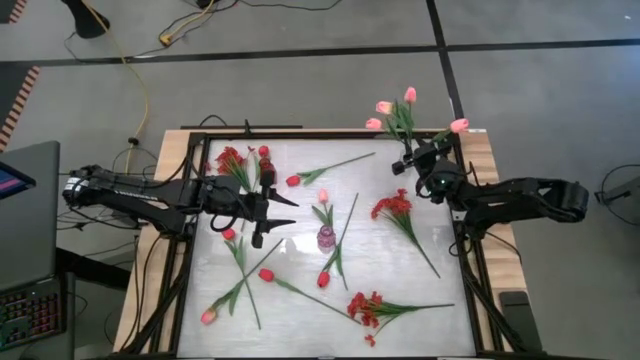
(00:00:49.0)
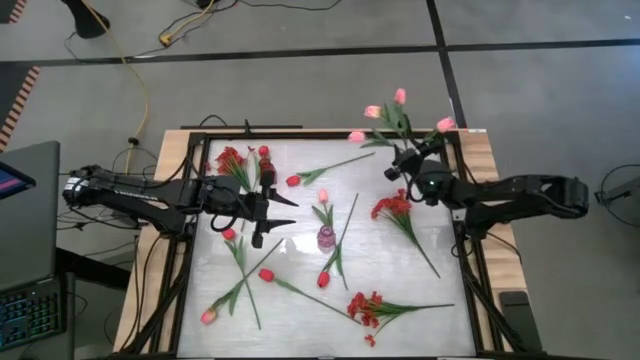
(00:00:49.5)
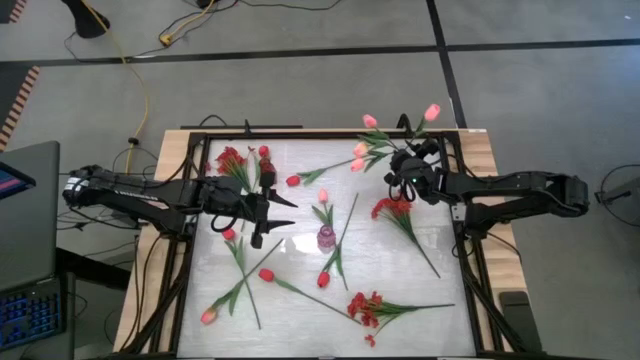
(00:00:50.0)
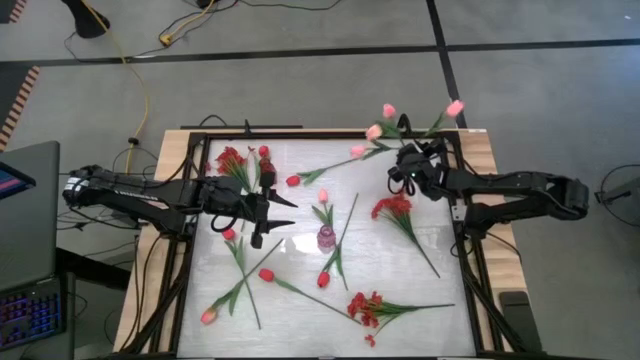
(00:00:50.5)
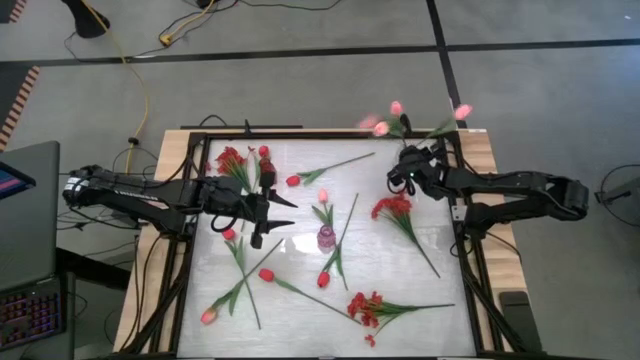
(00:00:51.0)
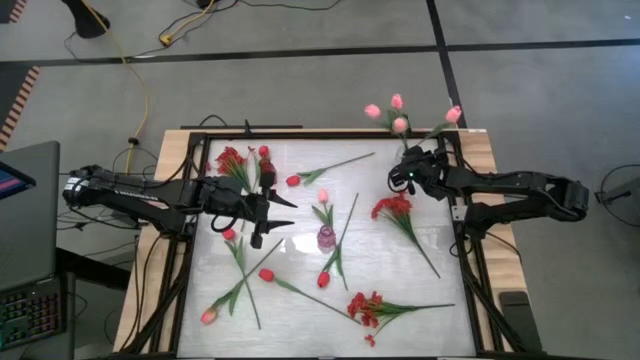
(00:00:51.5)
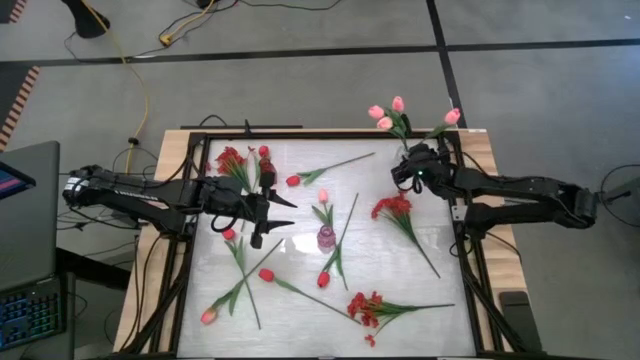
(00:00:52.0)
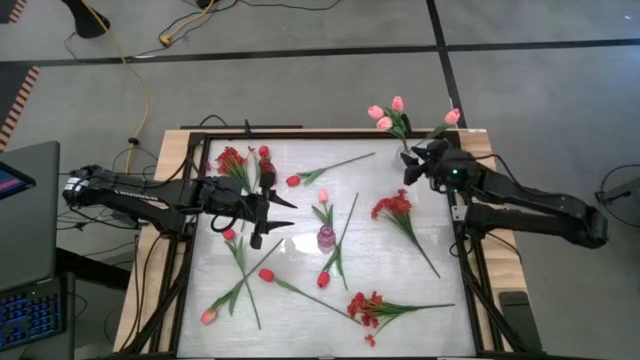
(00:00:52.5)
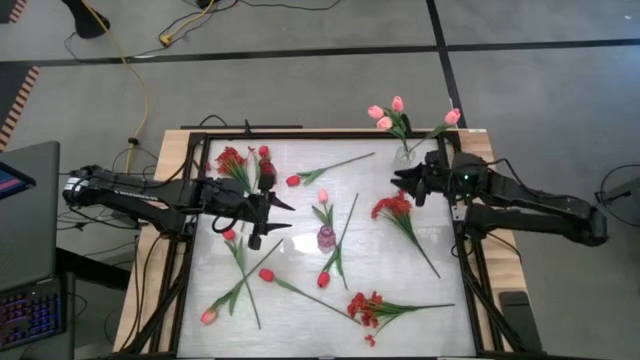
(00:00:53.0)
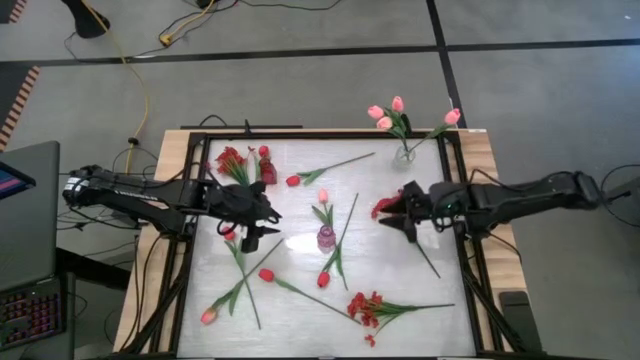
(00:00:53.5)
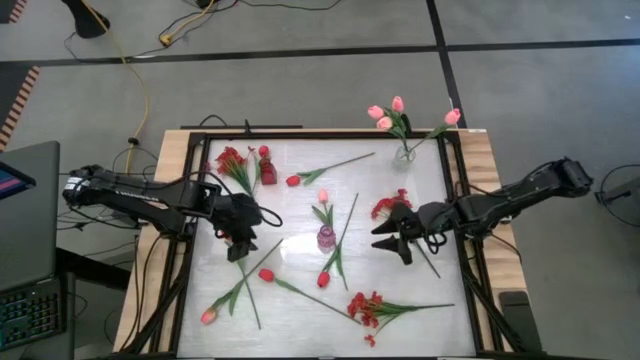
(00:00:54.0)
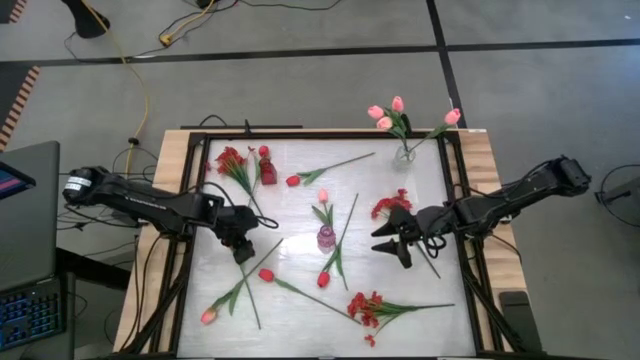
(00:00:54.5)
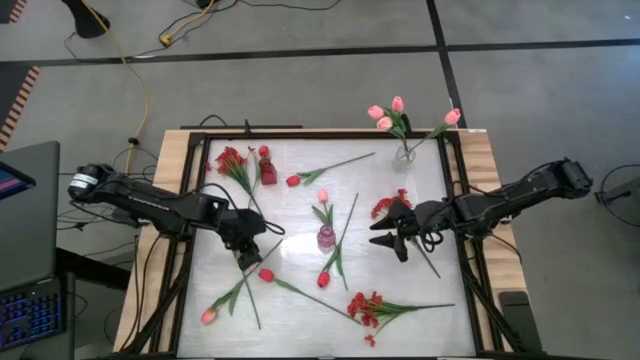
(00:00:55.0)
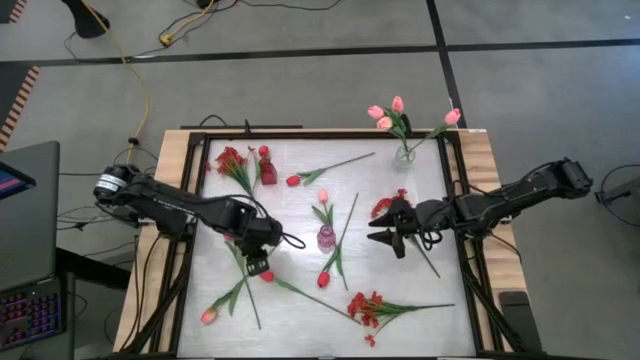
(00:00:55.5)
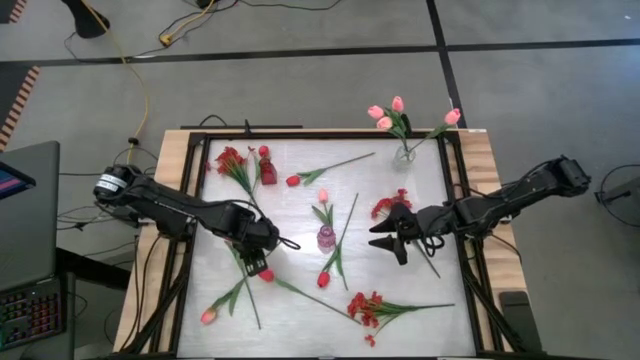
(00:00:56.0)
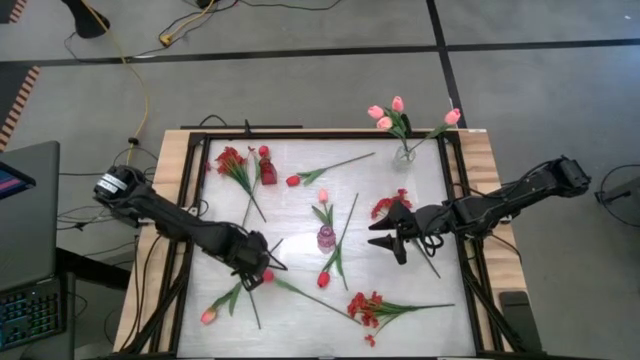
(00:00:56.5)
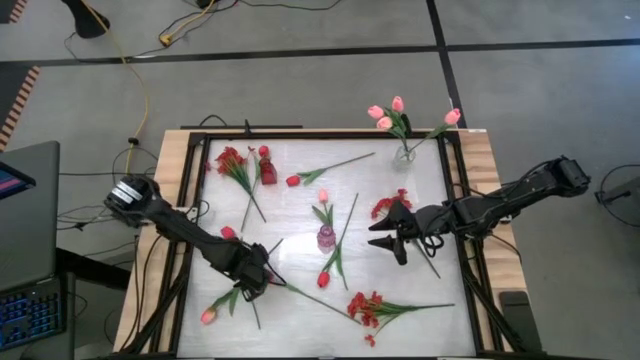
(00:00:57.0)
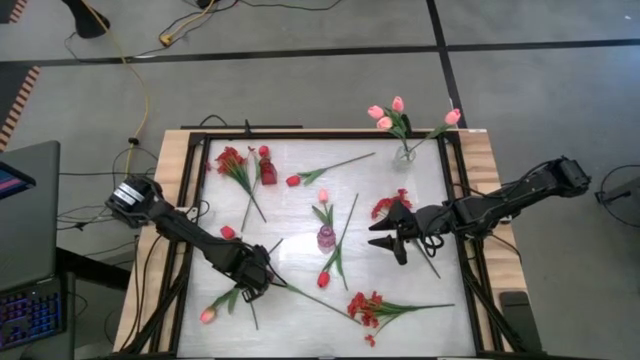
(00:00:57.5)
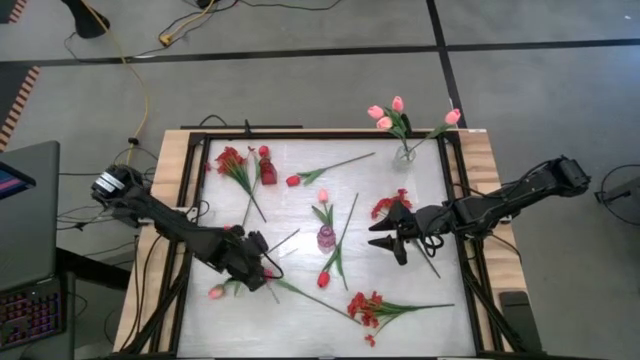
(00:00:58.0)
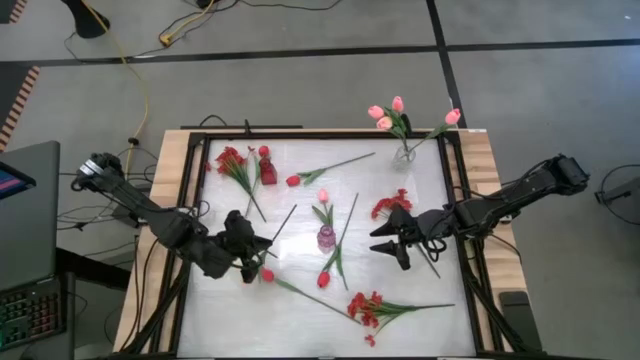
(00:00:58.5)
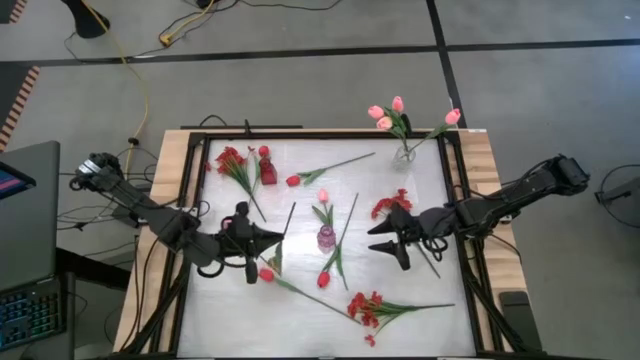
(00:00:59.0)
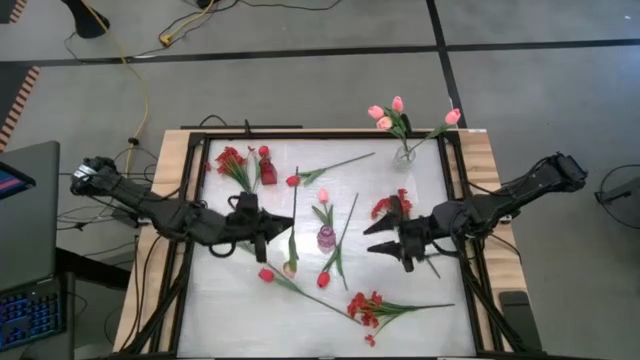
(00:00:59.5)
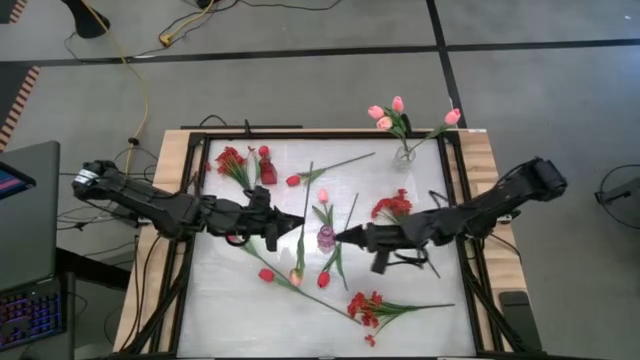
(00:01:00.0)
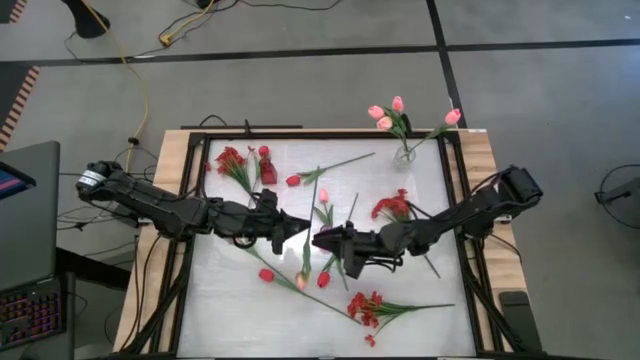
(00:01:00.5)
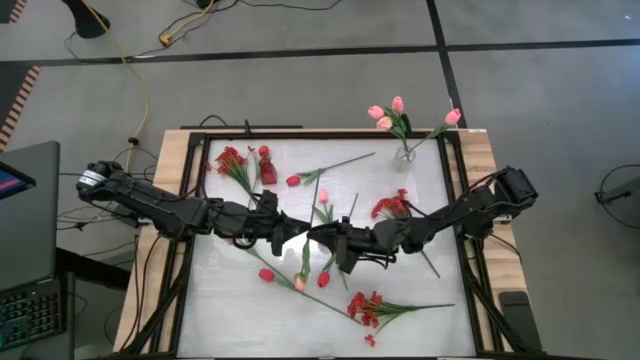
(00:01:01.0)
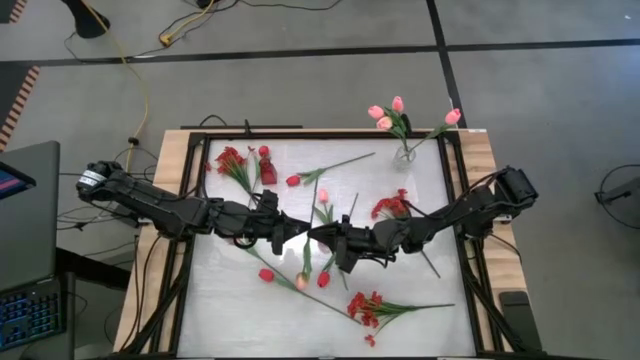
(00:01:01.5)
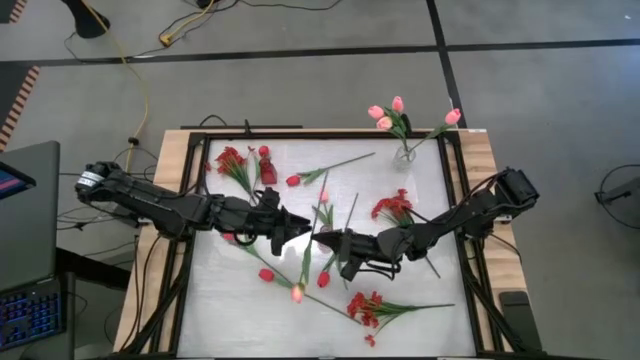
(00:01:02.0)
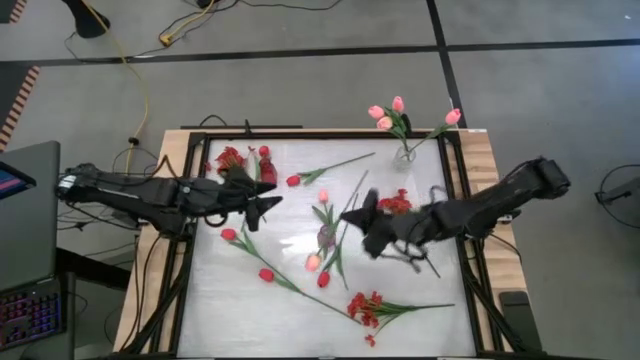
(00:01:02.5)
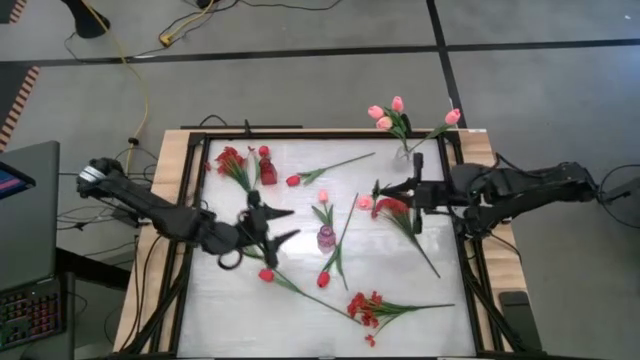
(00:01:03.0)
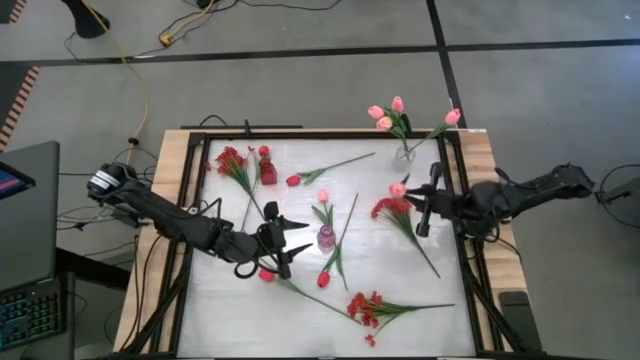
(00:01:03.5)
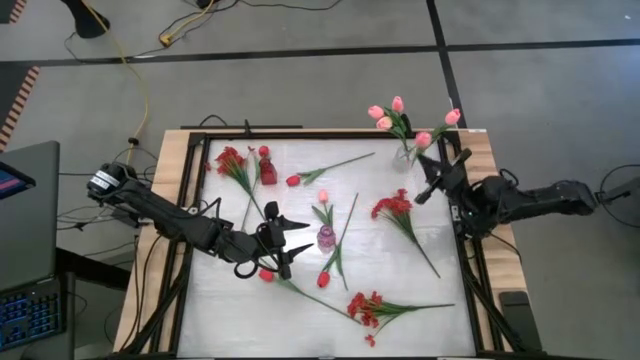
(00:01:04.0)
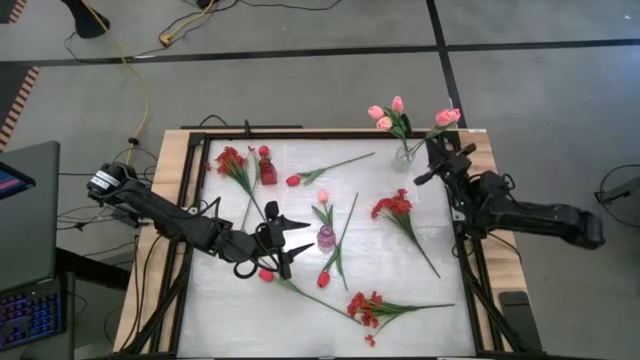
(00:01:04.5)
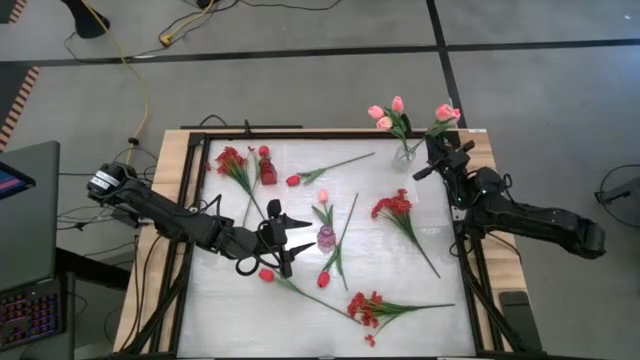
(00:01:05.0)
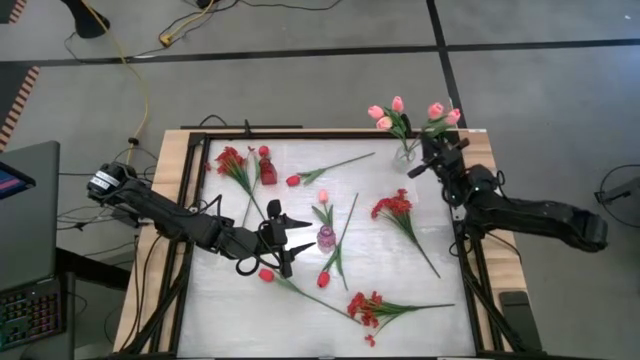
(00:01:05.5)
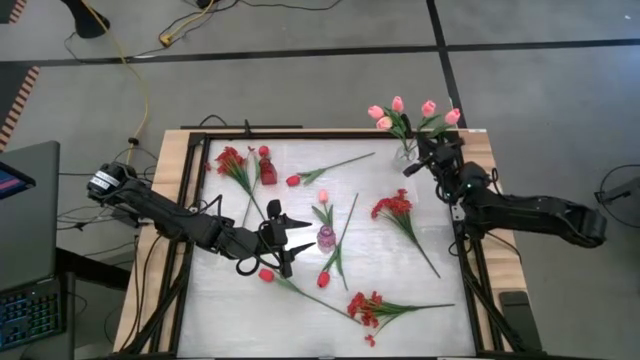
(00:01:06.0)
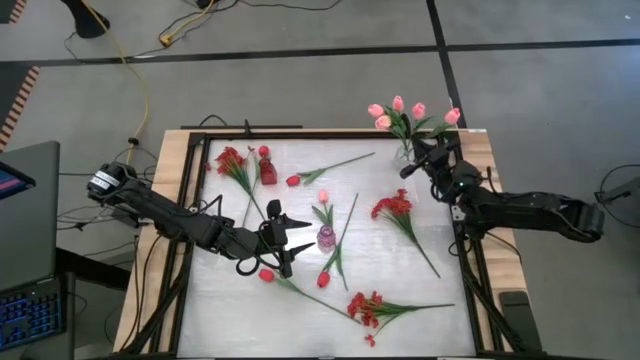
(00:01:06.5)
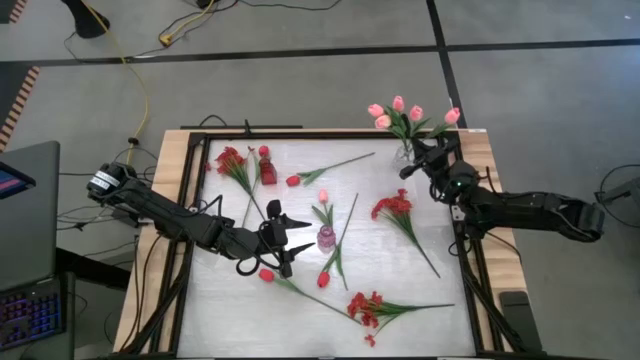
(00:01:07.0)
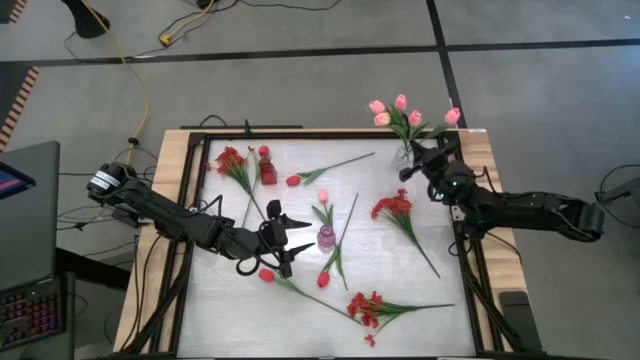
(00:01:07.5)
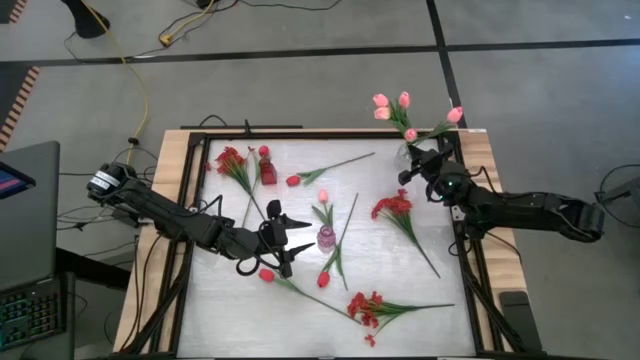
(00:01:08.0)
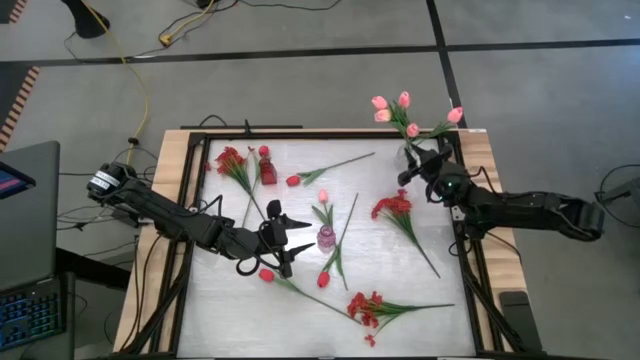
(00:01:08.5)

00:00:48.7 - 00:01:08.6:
Task: Sort flowers into vase by color
Put the pink flower into the transparent vase
